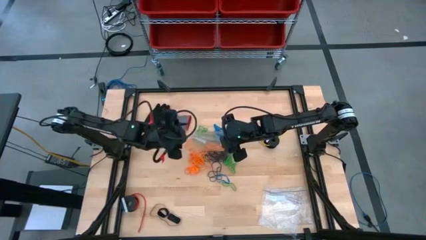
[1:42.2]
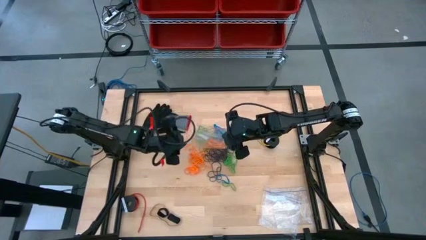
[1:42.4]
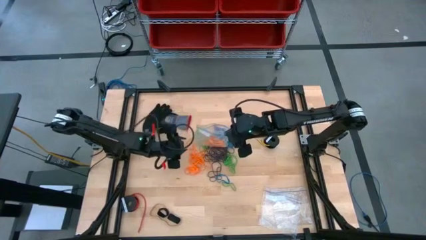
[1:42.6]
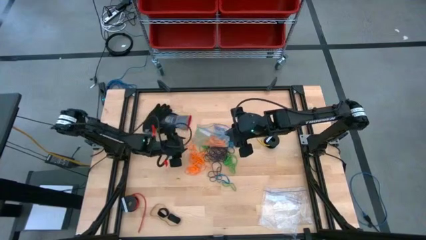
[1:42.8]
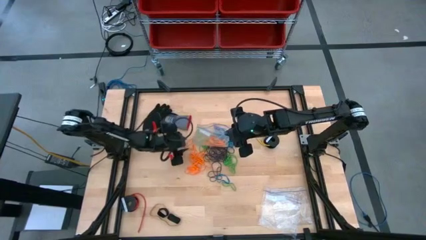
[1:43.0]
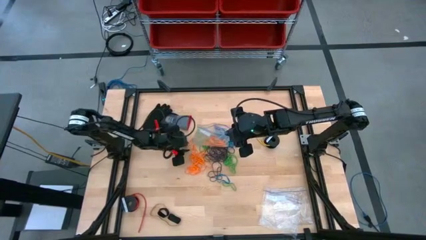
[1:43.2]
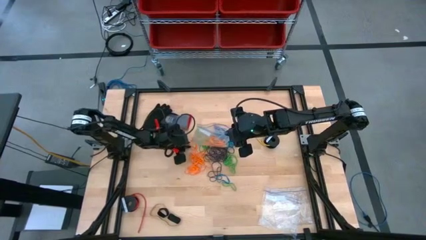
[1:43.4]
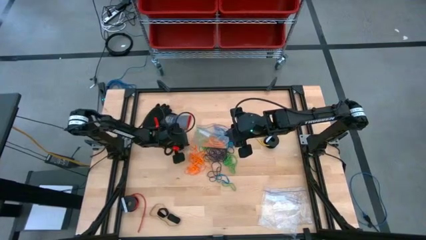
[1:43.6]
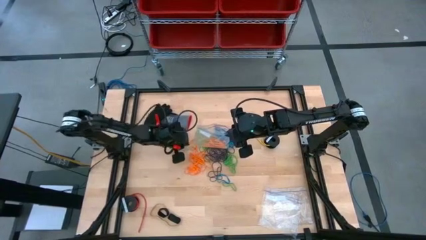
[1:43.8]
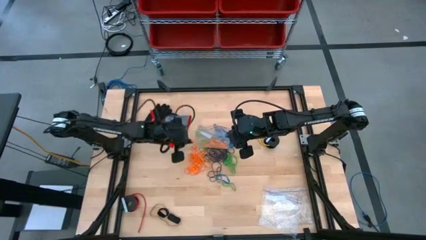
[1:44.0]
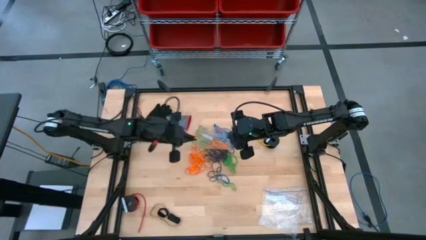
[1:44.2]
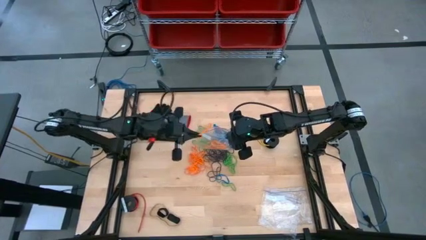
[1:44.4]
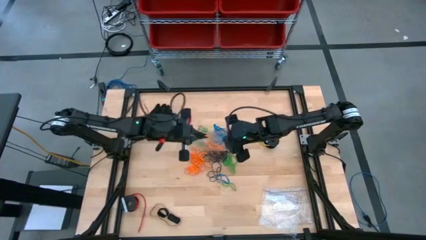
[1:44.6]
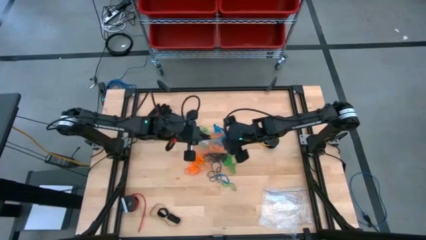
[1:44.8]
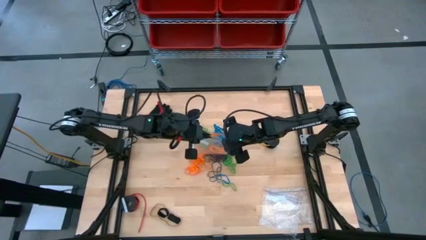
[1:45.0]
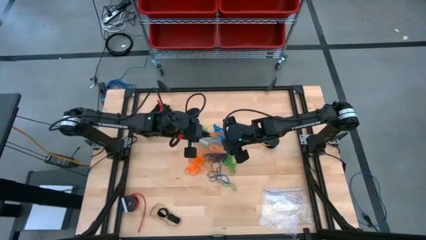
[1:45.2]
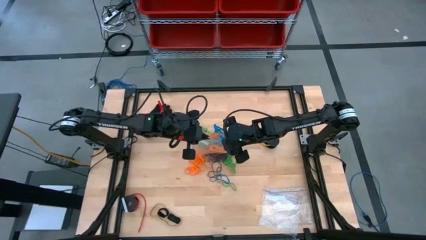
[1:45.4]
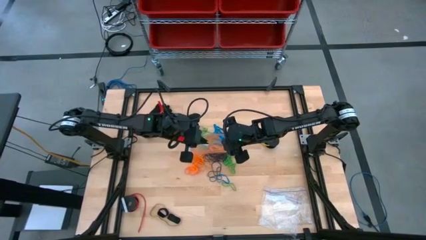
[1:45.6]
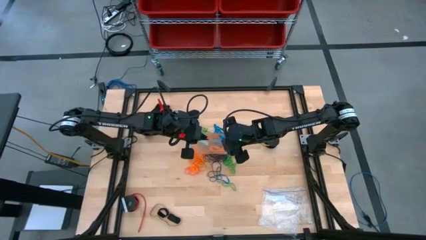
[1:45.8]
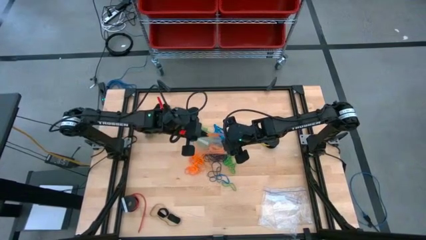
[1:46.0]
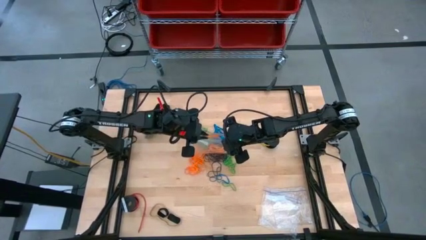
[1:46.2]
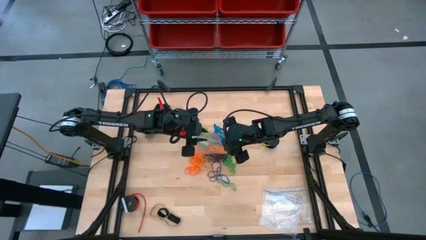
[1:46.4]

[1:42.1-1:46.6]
Task: Sort rubber bands
Put the orange rubber band into the transparent zip bag

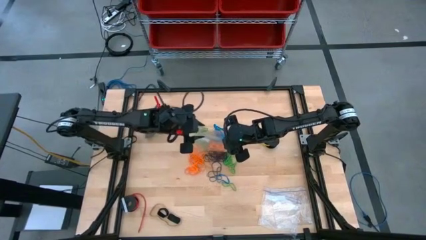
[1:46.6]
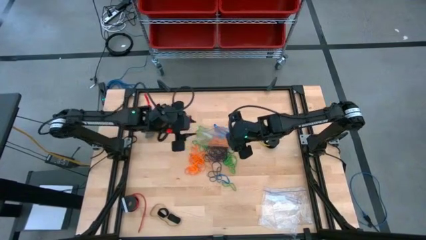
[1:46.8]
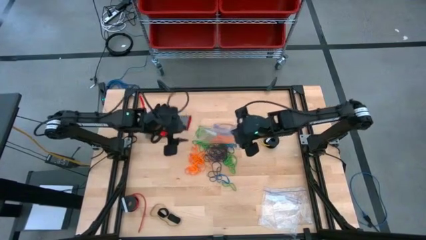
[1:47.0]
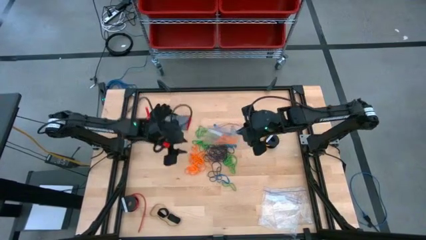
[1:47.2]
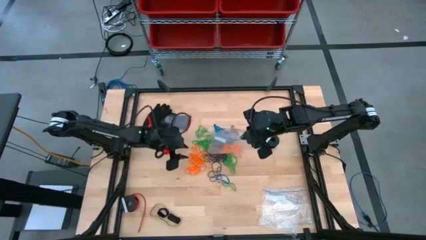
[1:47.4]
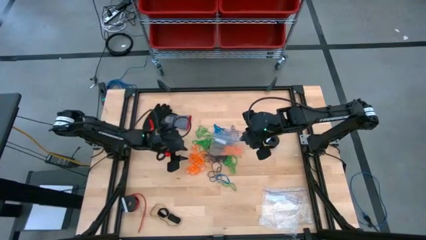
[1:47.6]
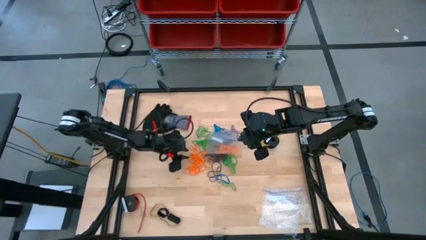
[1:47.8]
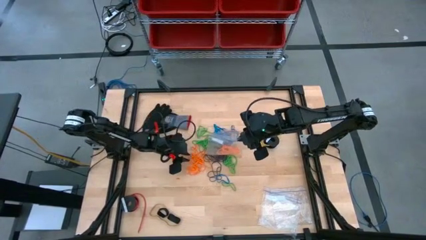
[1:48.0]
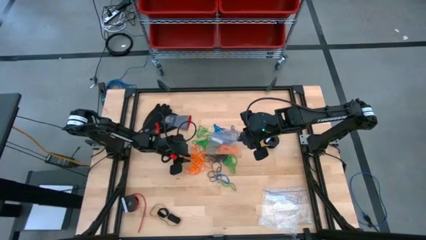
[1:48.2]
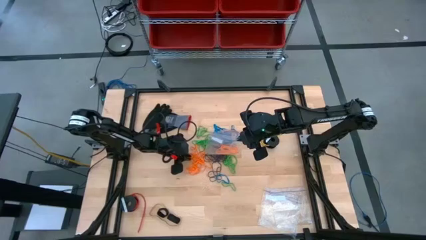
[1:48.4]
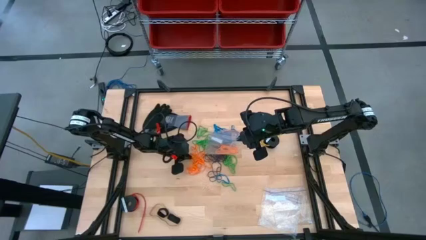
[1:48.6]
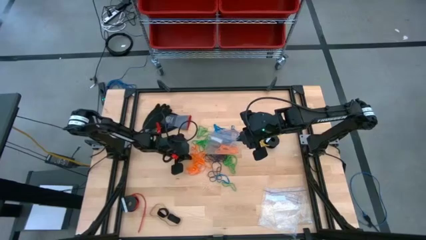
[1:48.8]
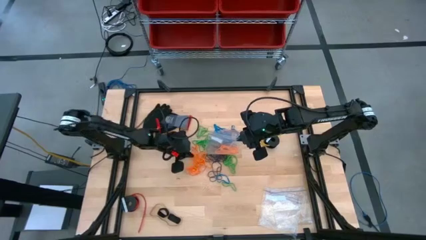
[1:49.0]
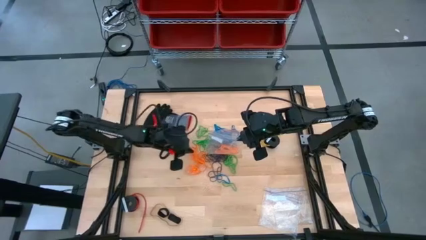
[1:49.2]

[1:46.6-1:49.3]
Put the orange rubber band into the transparent zip bag

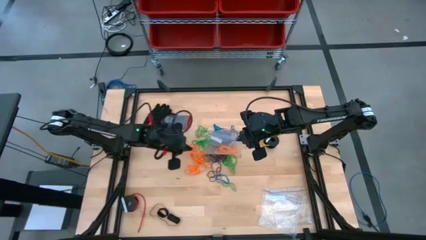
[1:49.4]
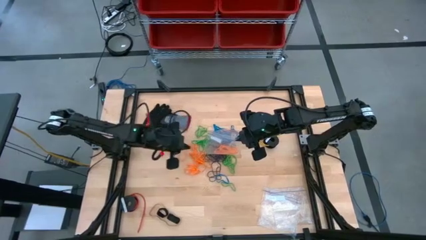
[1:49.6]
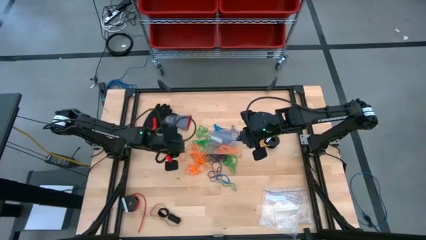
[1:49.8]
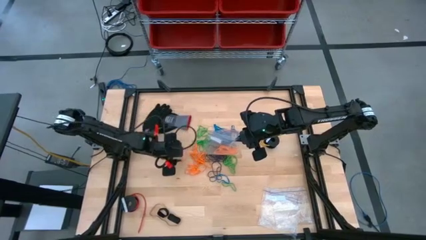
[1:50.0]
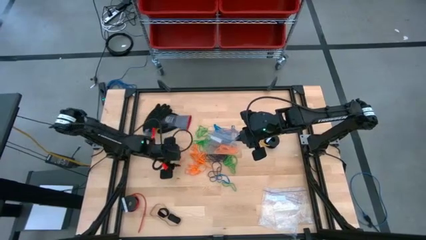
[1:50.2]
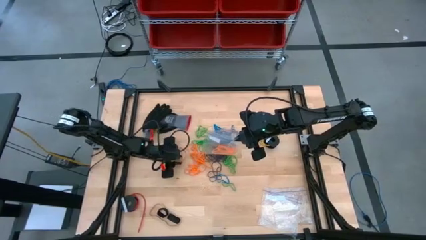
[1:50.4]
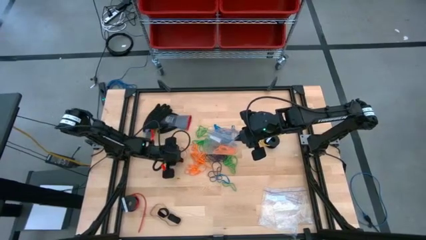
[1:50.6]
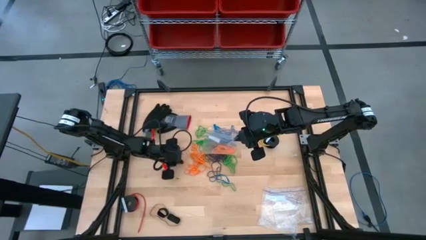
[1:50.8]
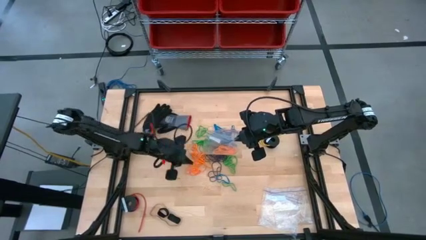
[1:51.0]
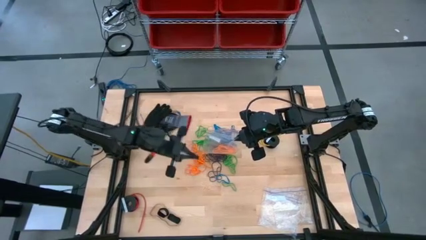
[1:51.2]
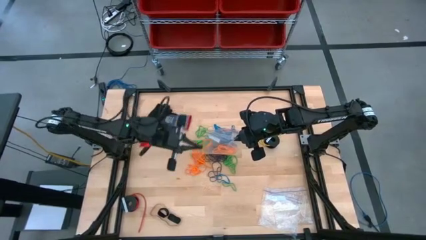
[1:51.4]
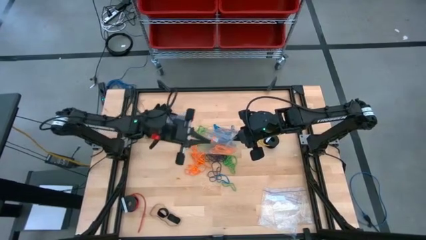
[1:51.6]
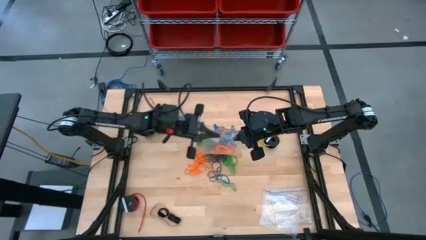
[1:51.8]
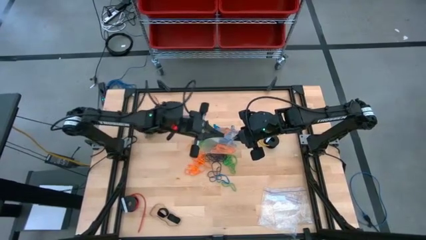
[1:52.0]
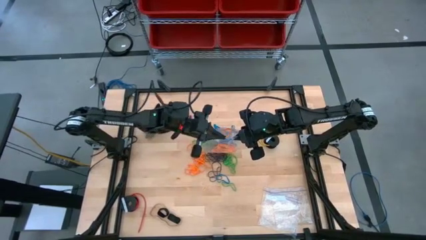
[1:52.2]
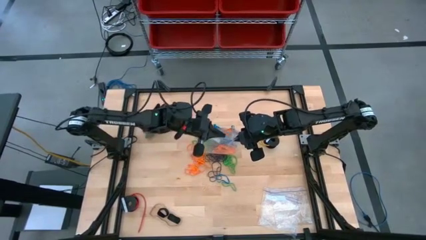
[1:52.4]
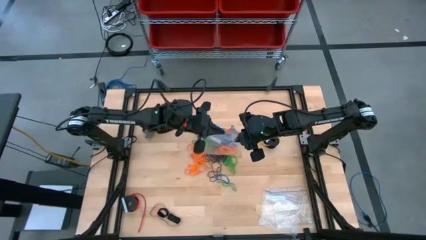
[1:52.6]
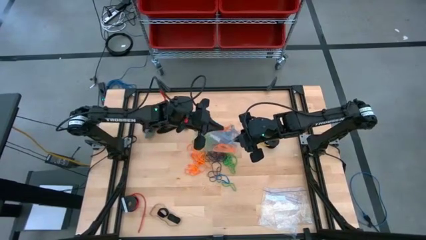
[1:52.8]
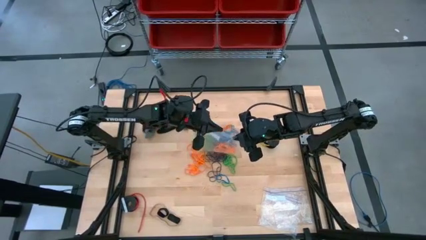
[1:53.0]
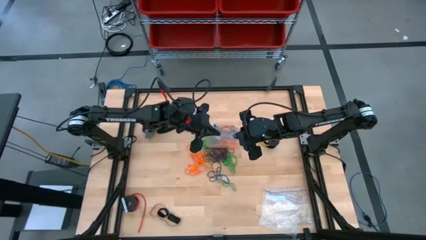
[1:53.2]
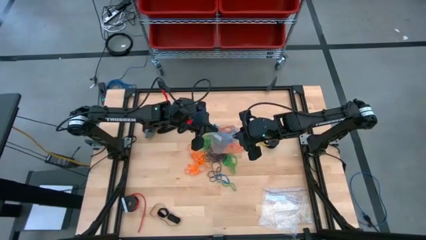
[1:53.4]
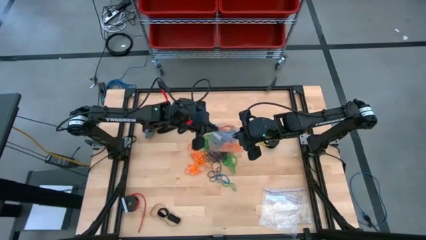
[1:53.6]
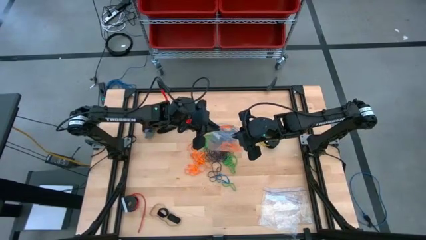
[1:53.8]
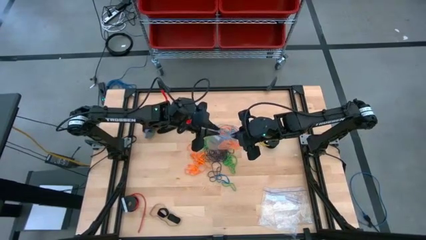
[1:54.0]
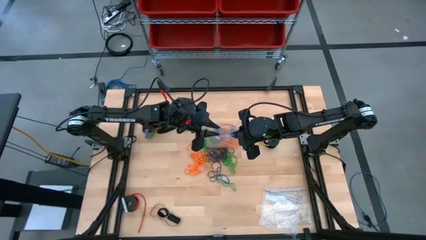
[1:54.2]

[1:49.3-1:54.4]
Put the orange rubber band into the transparent zip bag

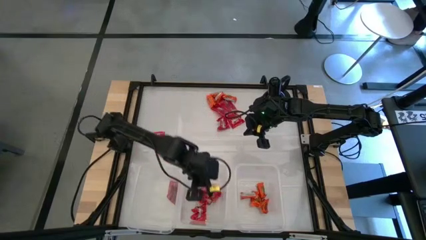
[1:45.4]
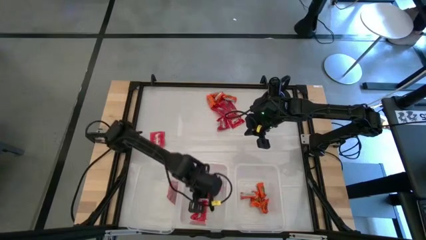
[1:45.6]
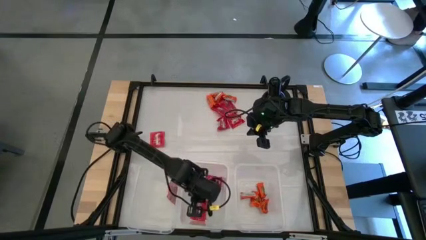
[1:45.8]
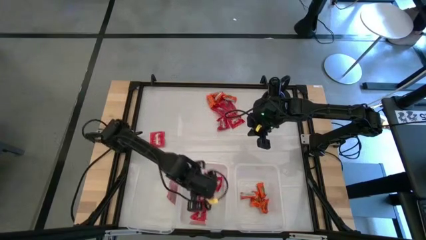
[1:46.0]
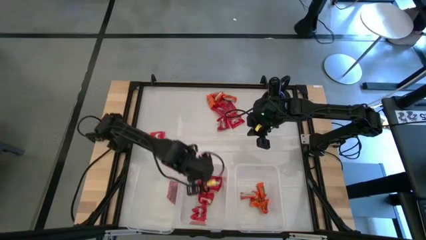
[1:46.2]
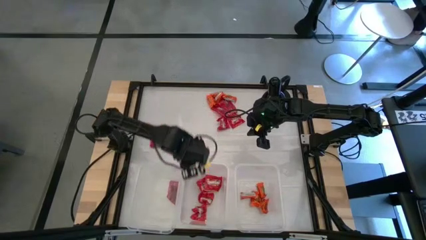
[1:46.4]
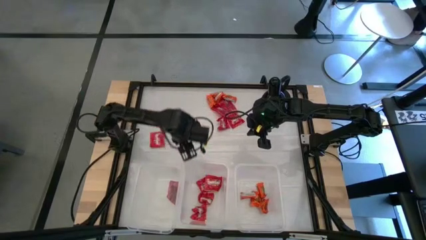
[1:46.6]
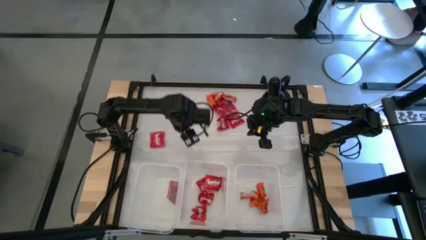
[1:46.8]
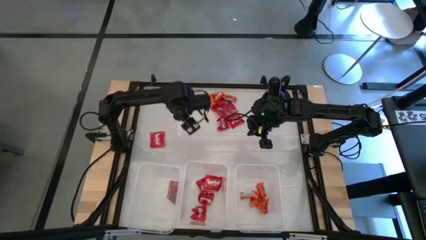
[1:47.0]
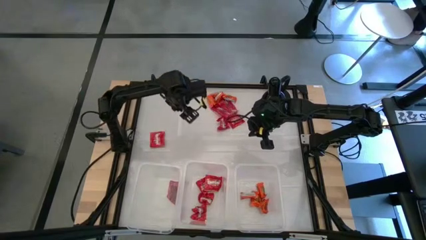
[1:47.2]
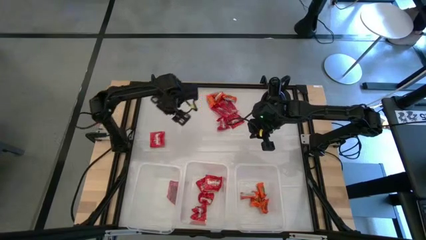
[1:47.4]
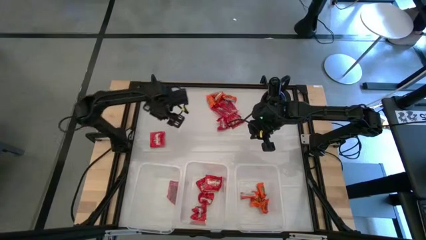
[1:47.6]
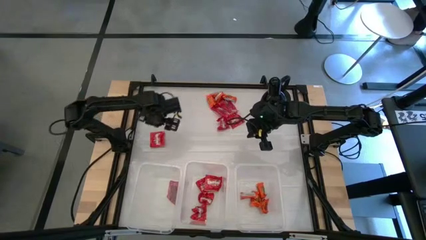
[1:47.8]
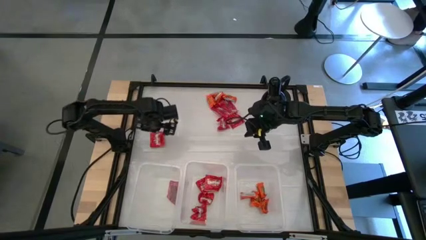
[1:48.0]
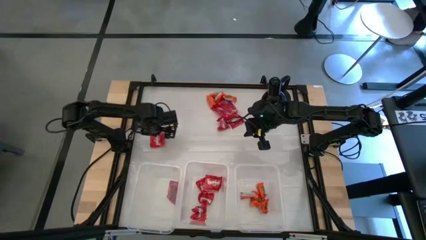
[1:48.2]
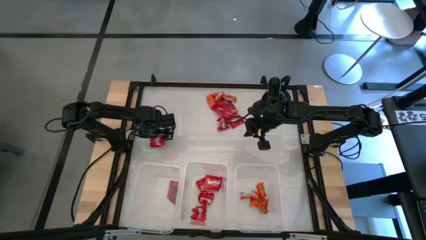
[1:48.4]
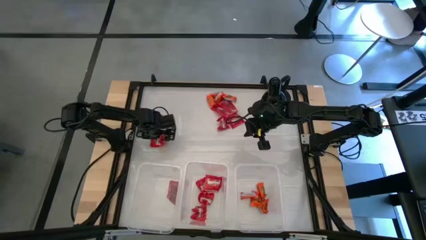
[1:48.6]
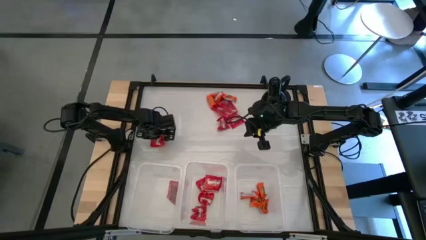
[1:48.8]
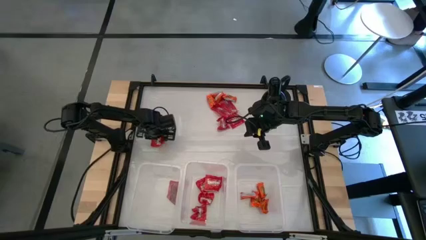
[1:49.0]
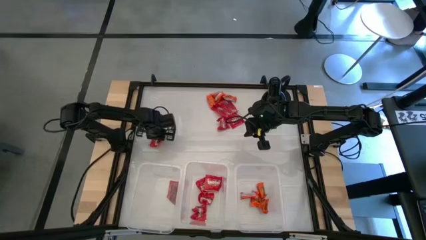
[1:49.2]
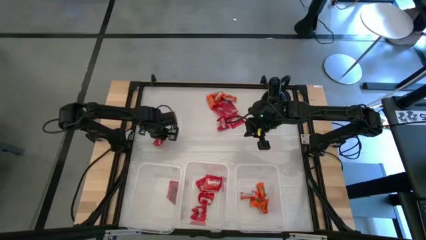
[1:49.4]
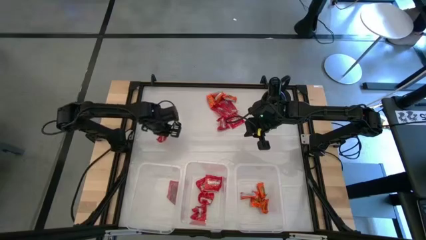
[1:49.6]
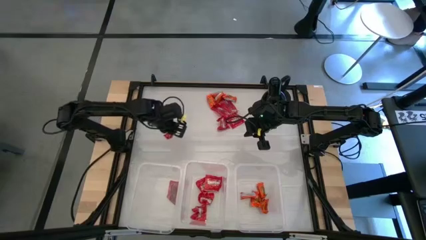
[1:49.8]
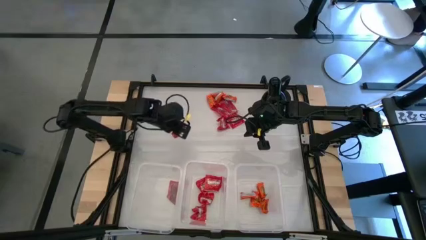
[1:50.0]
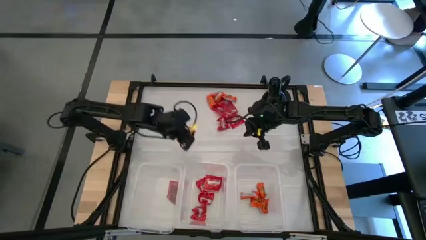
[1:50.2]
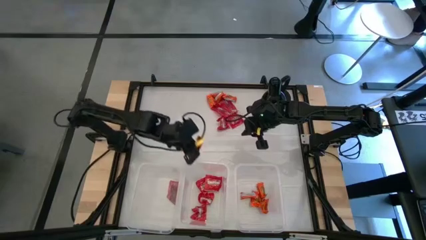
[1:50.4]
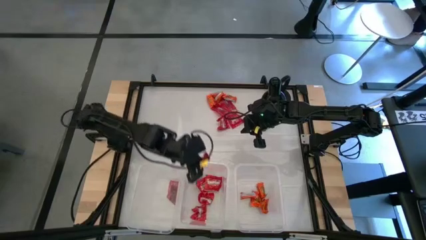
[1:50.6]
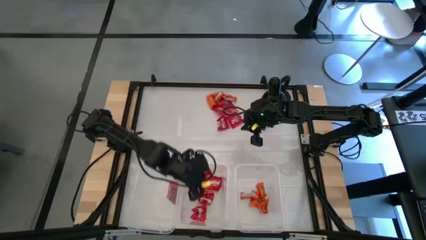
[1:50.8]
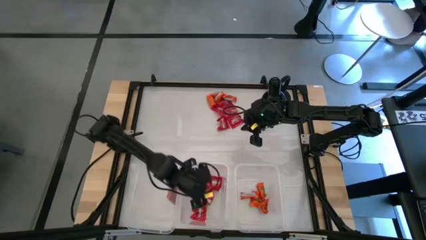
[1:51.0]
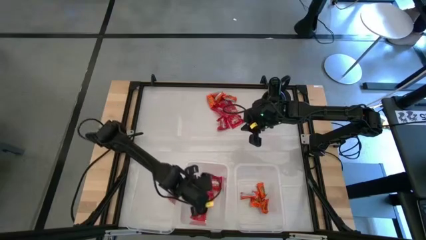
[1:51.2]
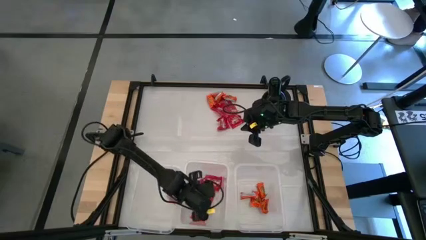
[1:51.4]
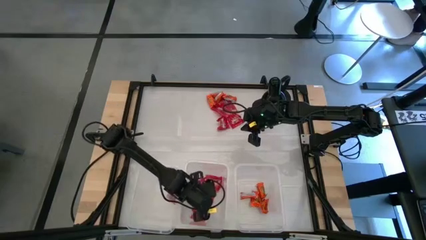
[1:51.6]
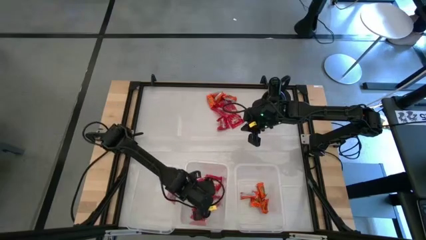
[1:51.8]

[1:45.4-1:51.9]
Task: Sort candy
Put the red candy into the middle transparent bin
